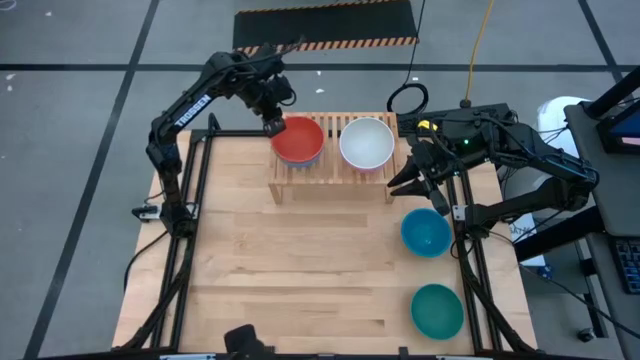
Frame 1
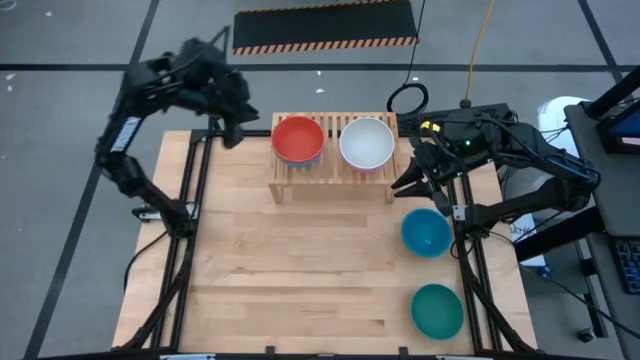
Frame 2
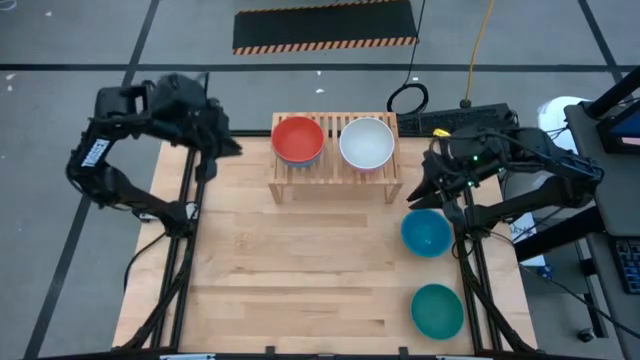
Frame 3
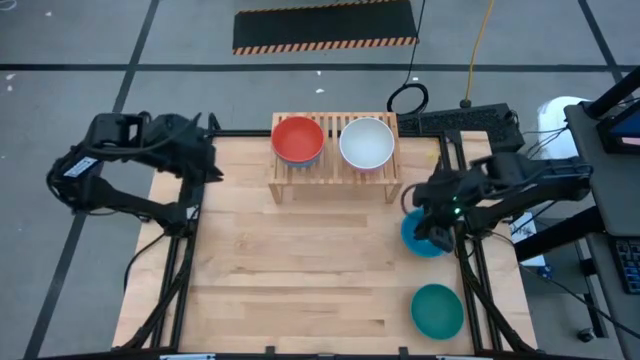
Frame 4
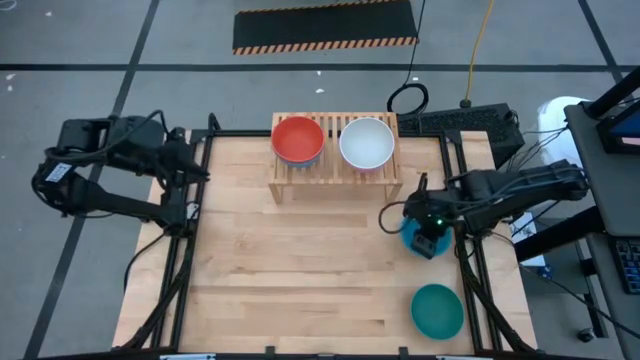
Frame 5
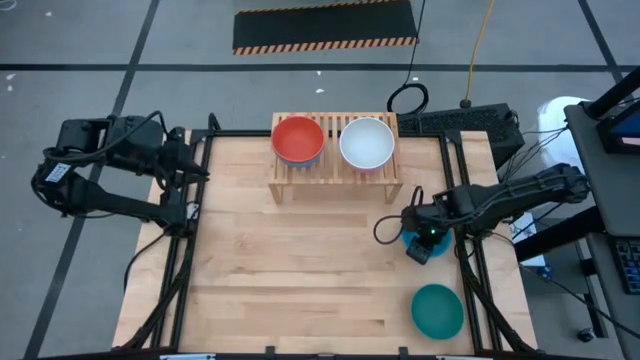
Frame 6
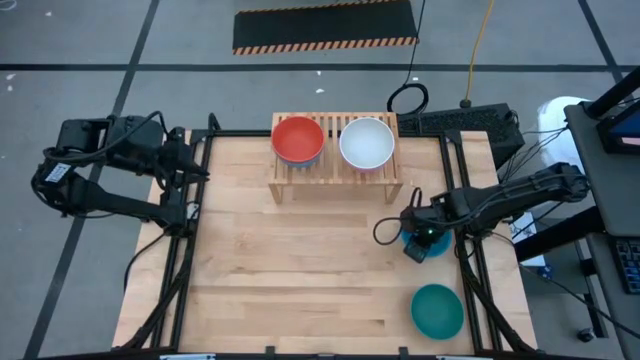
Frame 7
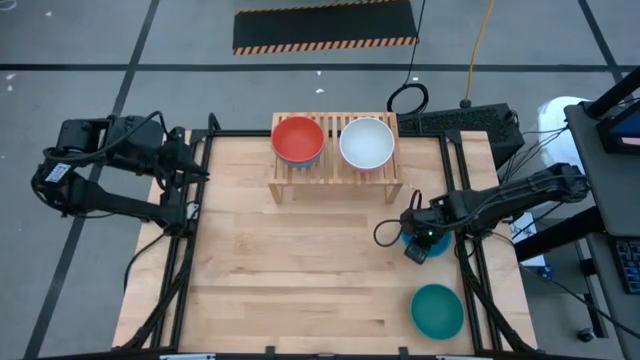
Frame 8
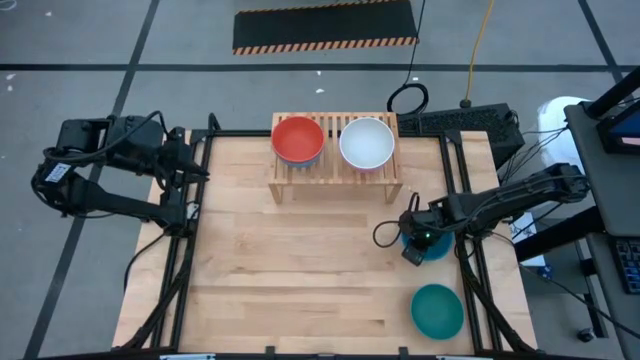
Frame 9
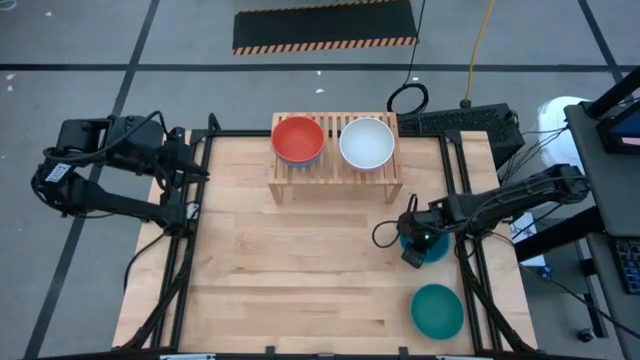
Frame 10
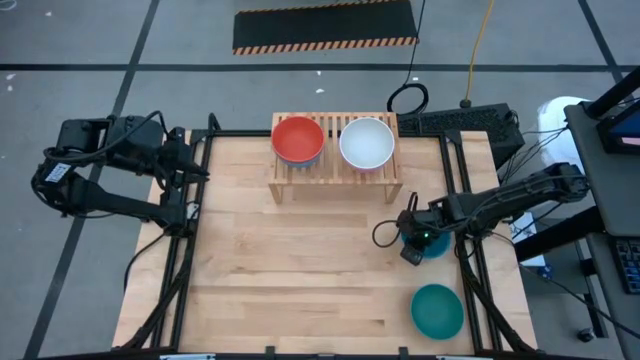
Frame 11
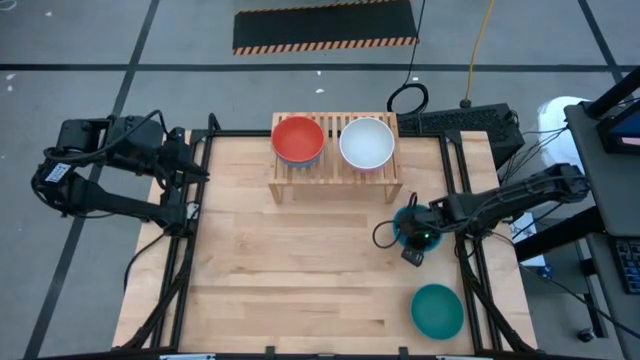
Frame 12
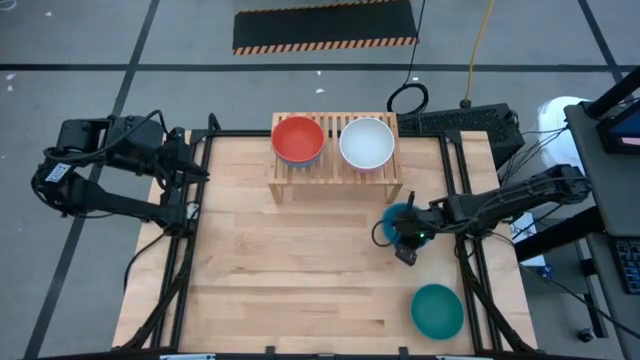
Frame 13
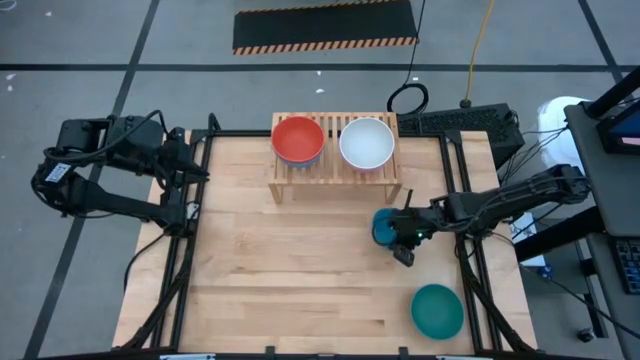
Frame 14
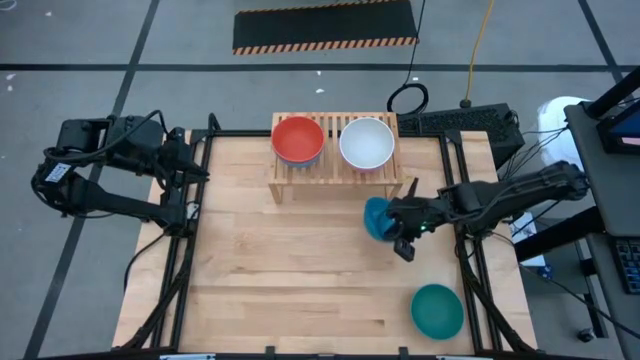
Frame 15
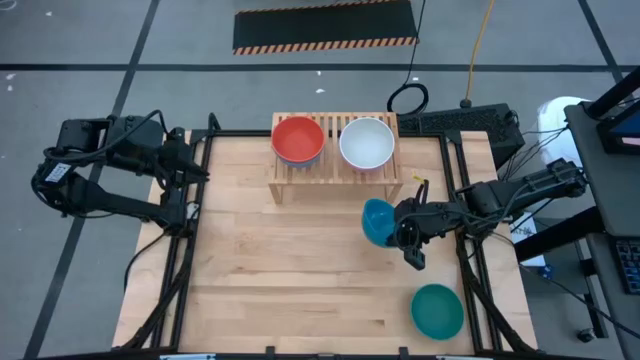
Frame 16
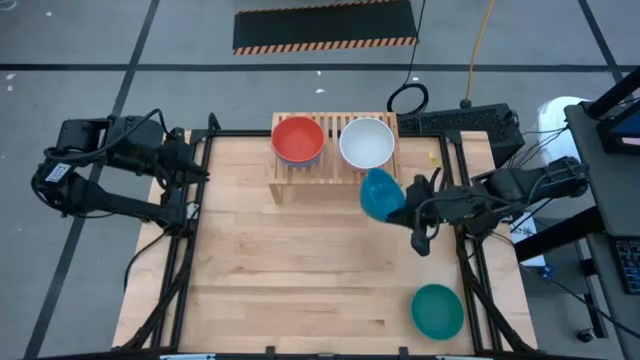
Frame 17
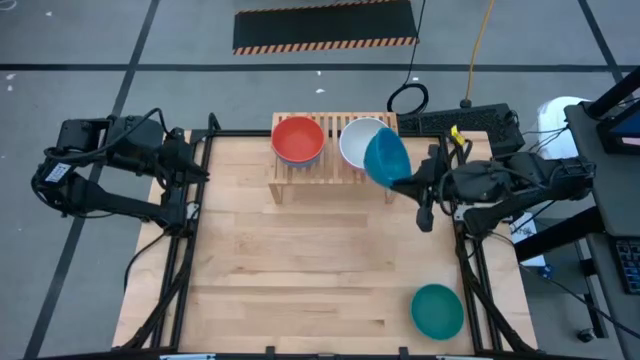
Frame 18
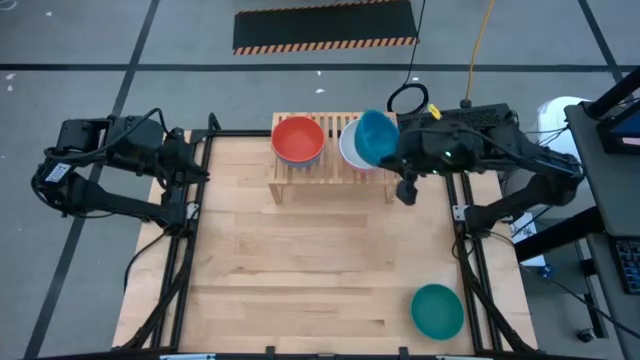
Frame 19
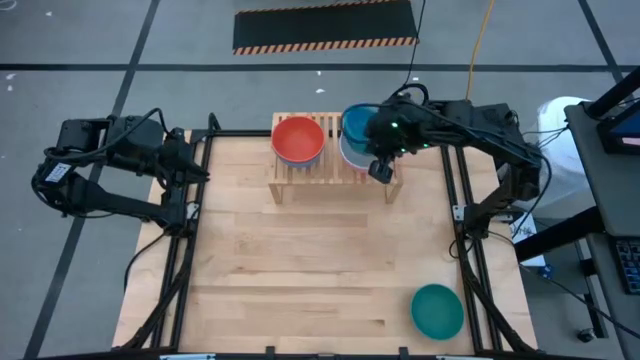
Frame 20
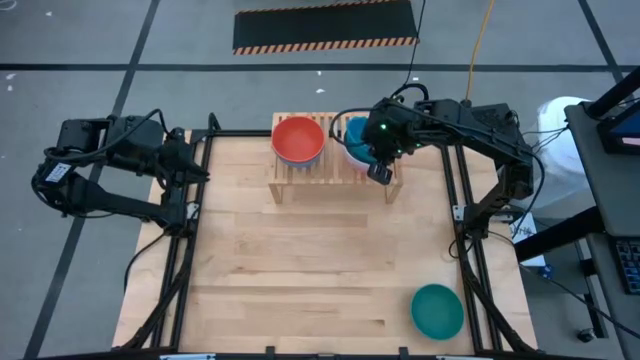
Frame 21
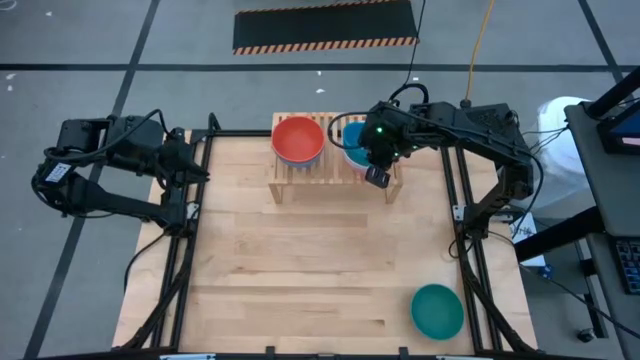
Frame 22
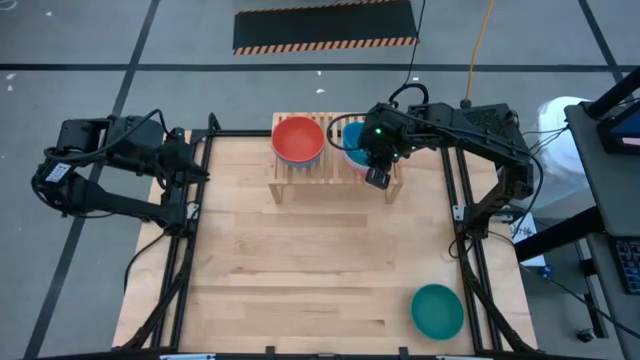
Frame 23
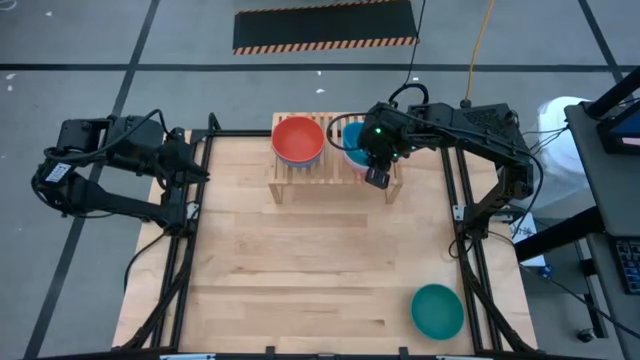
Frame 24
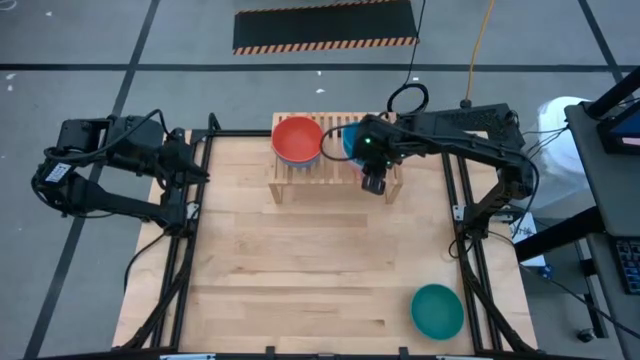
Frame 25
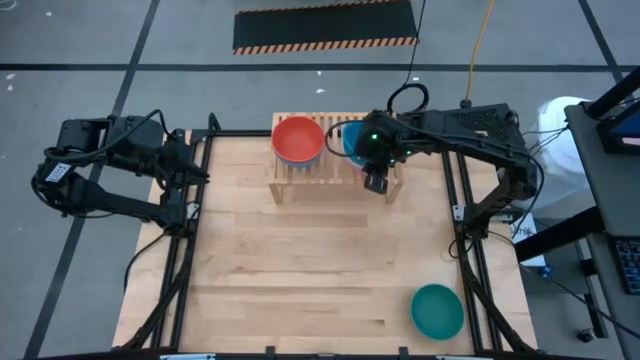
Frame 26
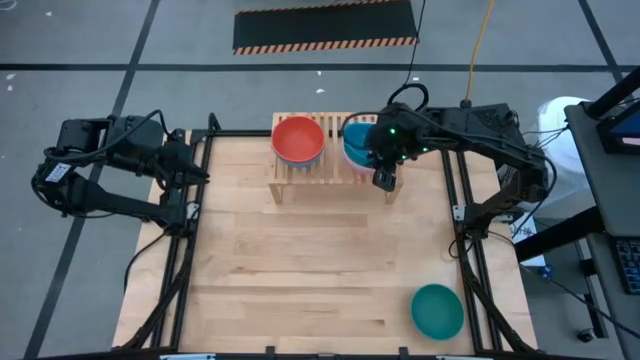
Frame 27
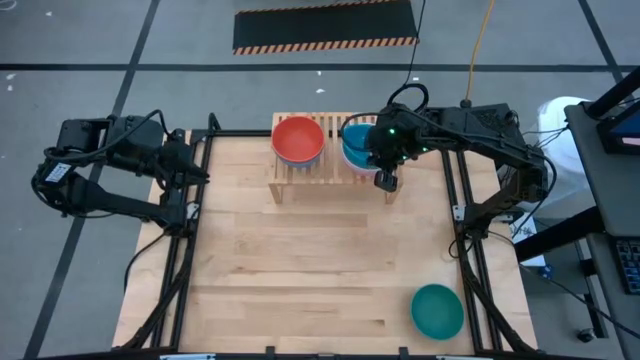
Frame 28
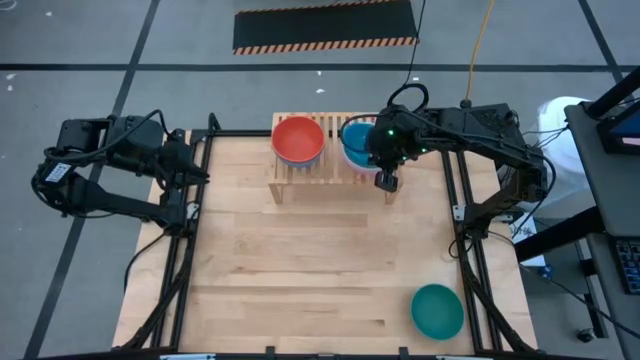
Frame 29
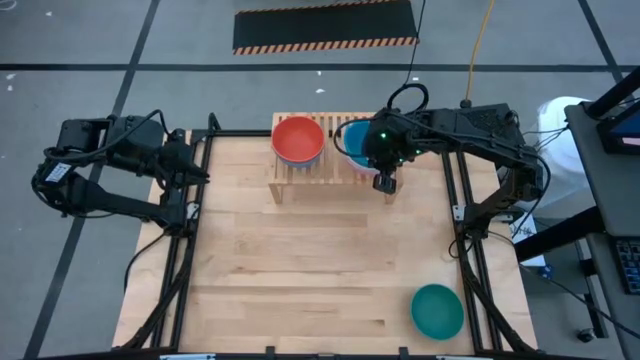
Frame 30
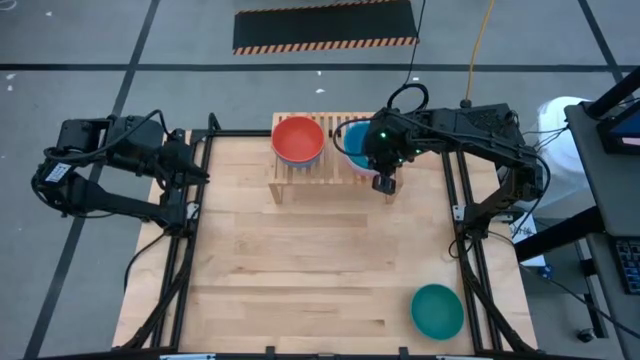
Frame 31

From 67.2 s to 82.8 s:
Task: Place and stack bowls onto a shelf
Stack the blue bowl on top of the white bowl on the shelf
